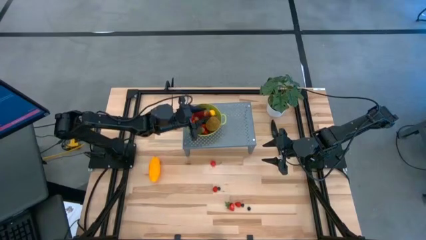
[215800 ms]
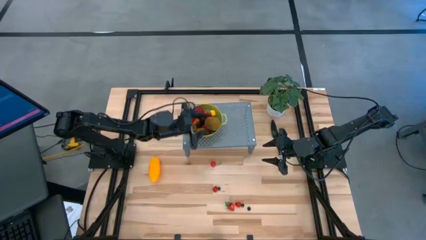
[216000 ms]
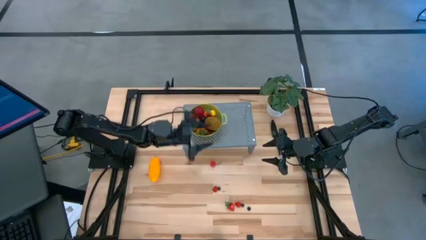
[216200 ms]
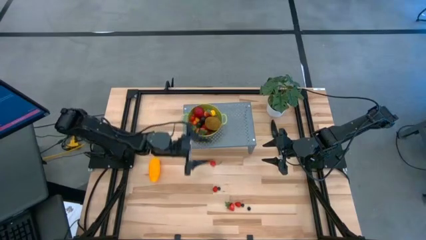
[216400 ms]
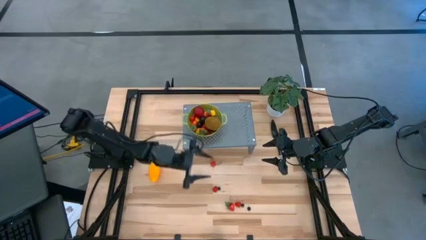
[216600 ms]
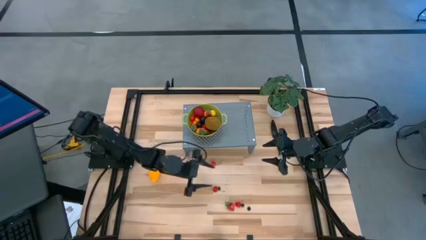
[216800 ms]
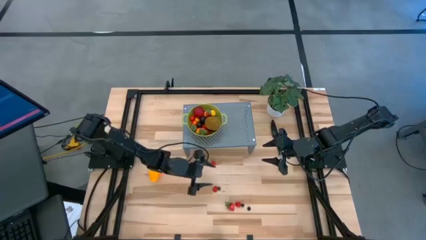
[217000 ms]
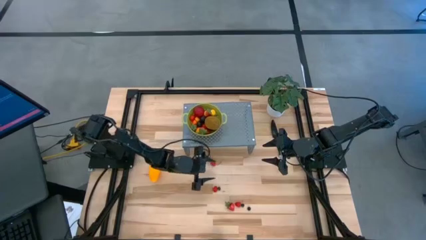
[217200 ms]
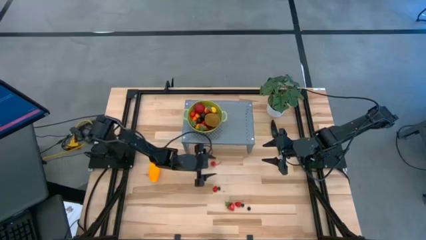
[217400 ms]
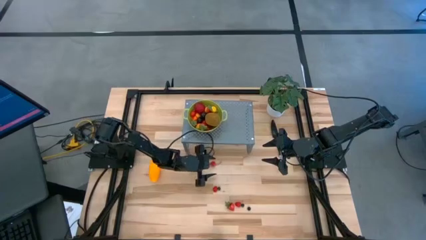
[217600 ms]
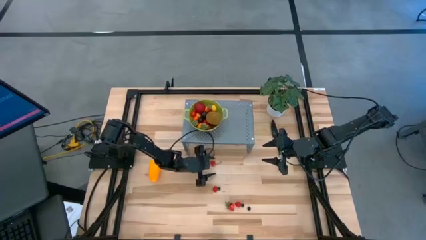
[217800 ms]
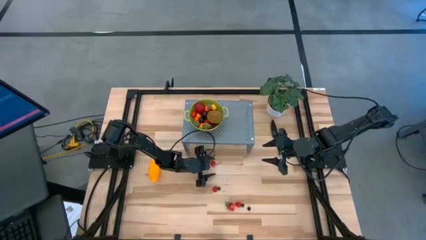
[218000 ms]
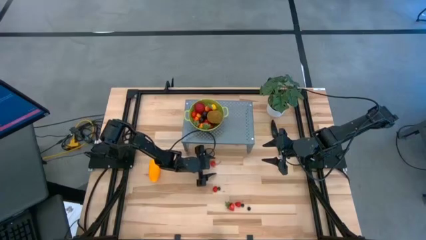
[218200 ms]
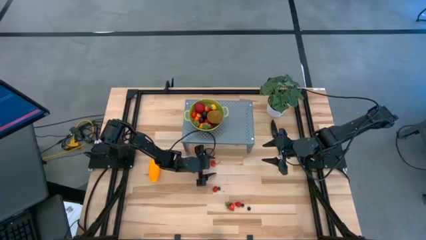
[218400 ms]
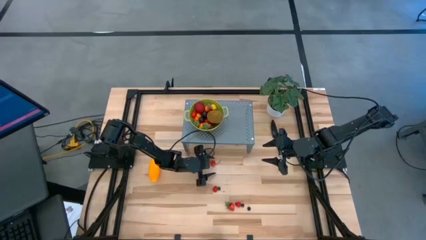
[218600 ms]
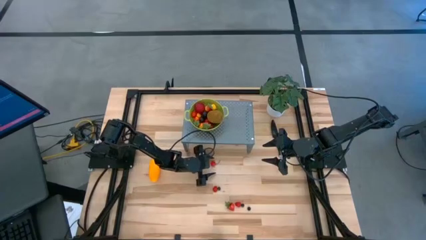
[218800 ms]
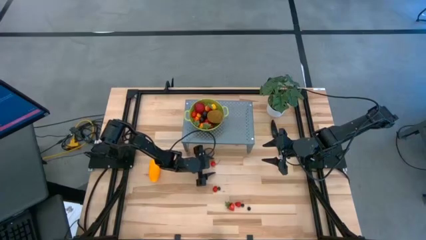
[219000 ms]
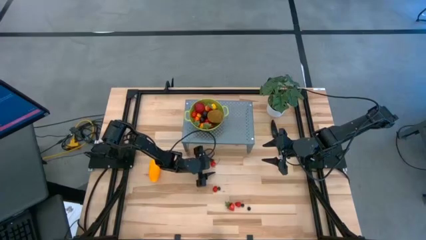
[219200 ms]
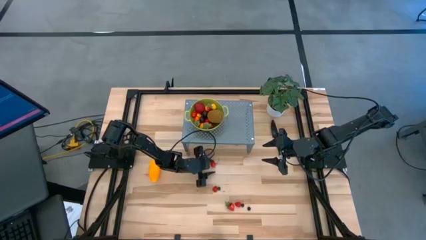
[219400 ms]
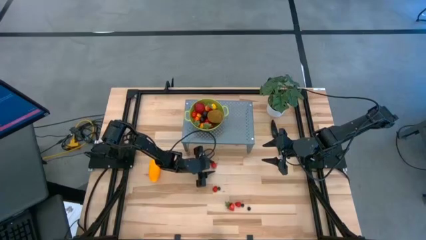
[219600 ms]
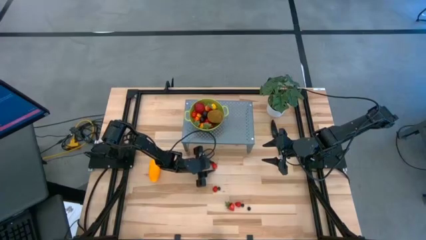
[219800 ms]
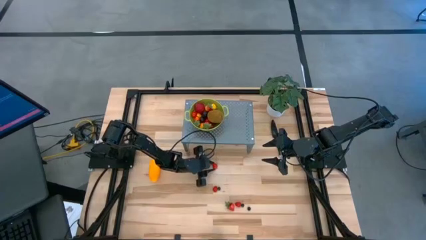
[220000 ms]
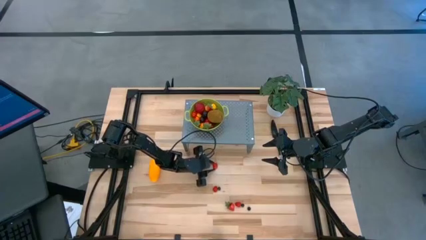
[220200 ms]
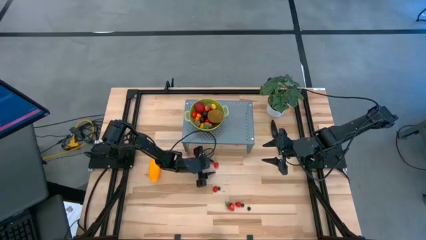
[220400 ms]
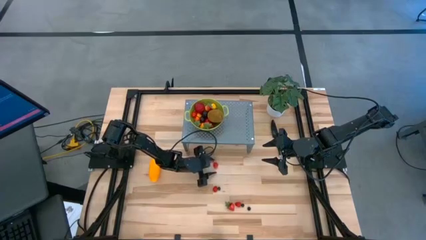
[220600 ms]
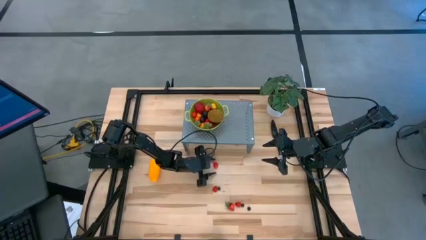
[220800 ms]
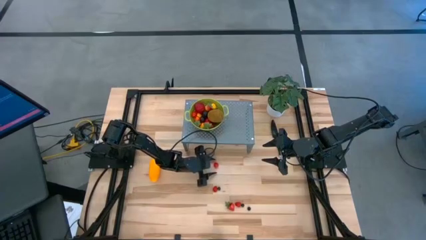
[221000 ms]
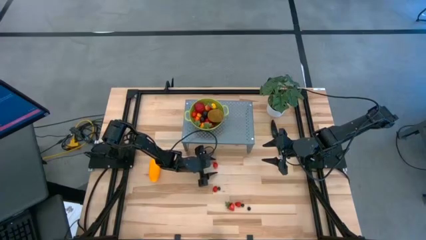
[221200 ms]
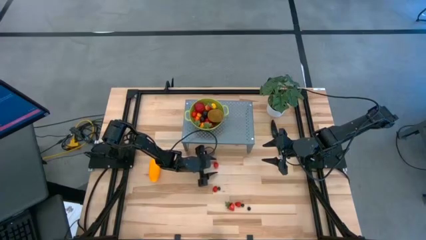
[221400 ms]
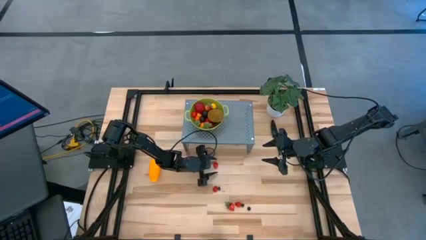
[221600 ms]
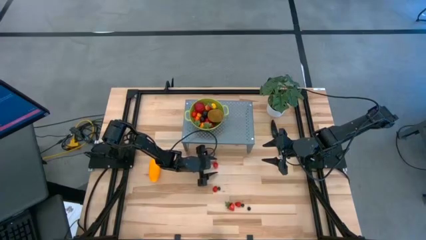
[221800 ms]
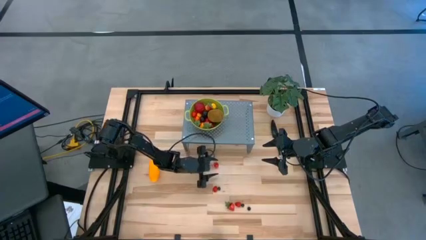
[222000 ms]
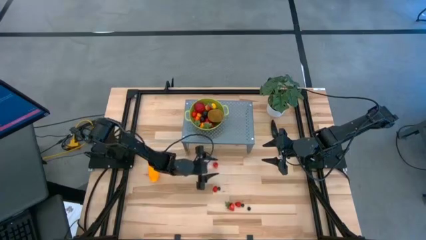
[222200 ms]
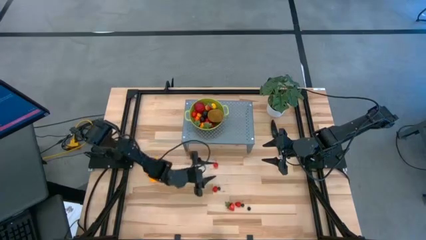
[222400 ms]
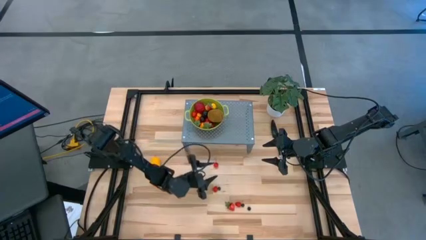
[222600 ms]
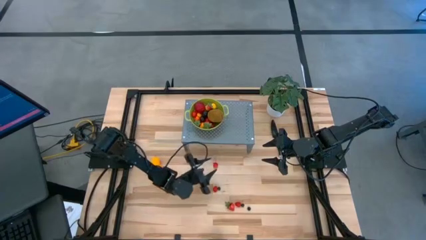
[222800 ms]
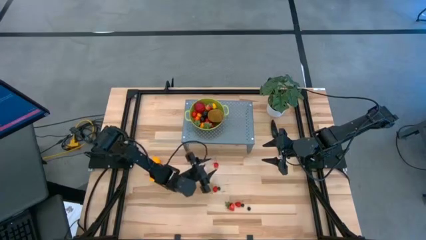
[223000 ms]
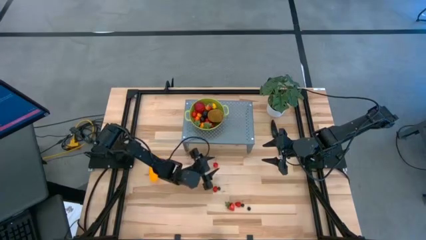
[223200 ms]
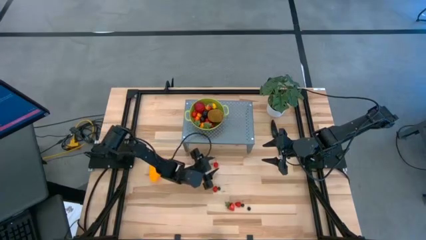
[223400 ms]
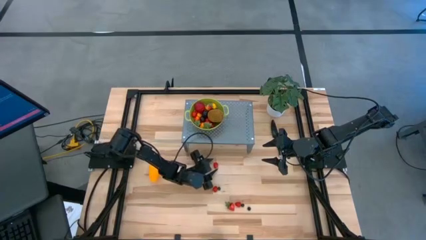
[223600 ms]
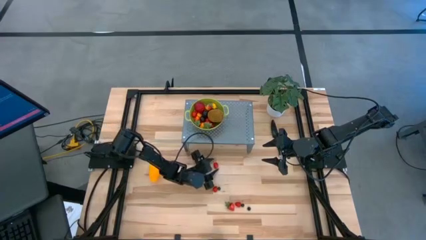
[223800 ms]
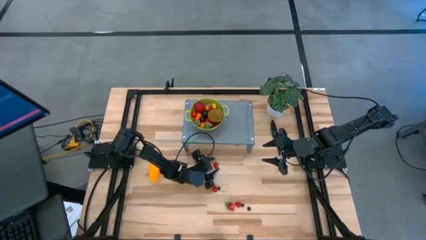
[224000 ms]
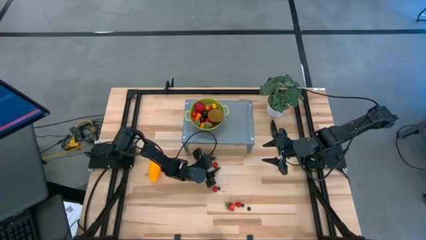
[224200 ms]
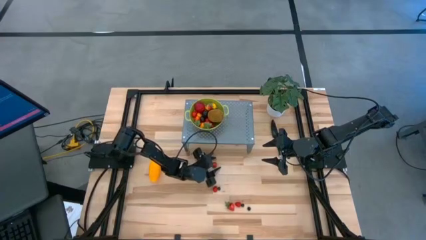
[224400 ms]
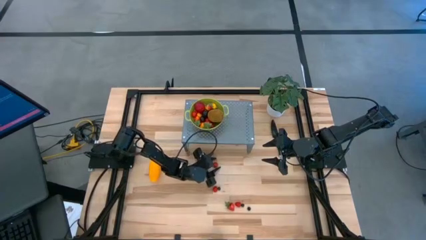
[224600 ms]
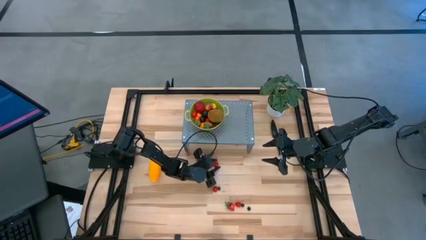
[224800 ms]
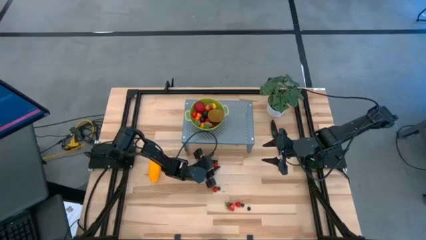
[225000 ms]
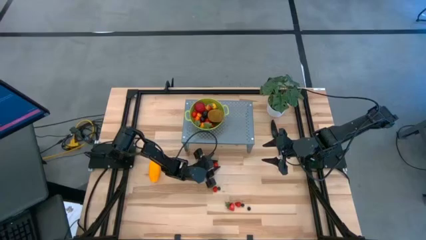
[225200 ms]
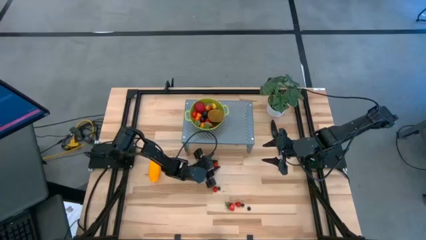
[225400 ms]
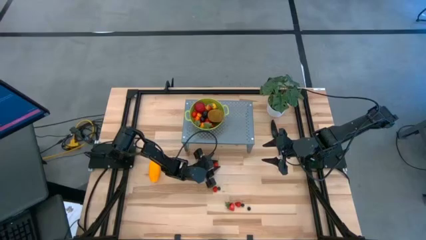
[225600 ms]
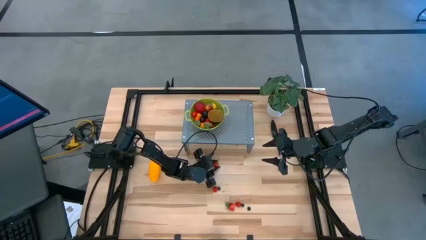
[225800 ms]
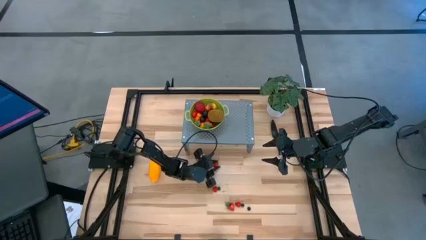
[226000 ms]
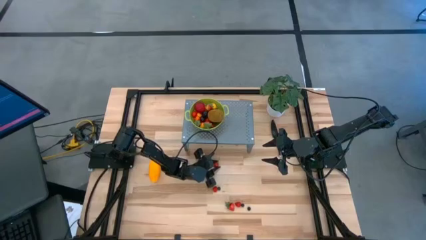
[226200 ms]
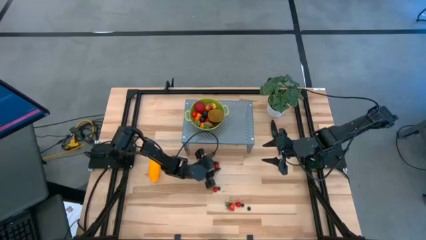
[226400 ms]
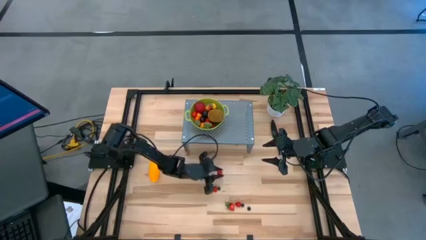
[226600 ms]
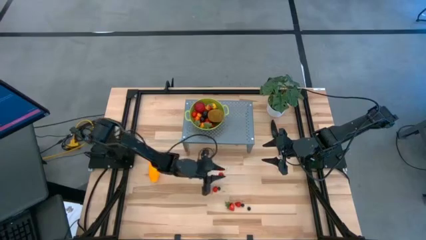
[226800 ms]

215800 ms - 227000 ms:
Task: Pick & Place Fruit
Put the red cherry into the green strainer bowl on the shelf

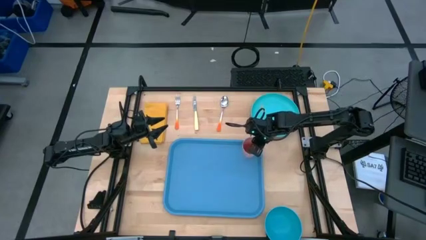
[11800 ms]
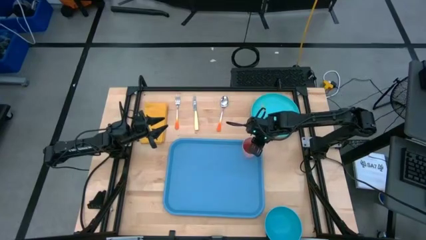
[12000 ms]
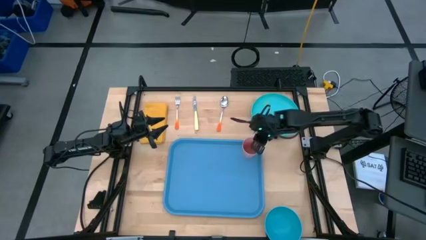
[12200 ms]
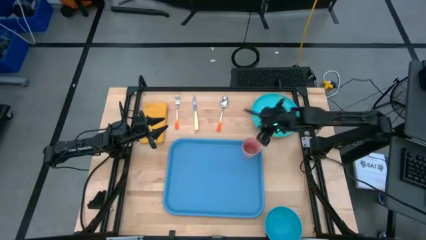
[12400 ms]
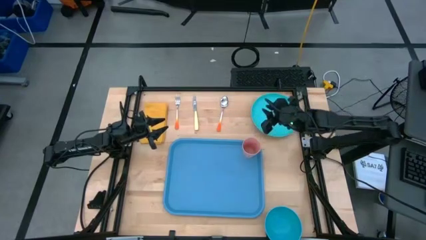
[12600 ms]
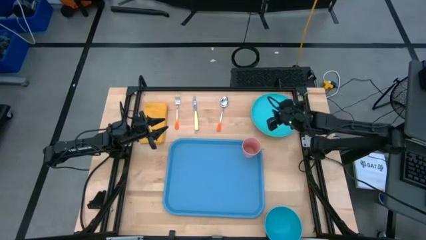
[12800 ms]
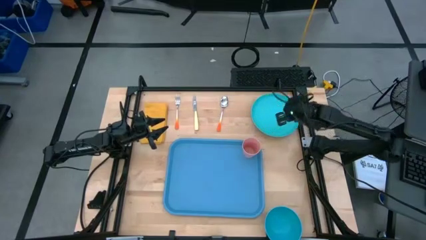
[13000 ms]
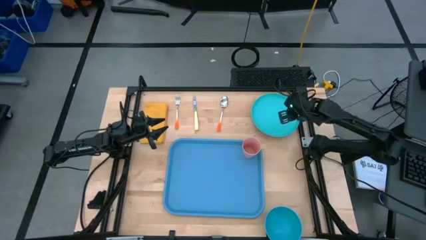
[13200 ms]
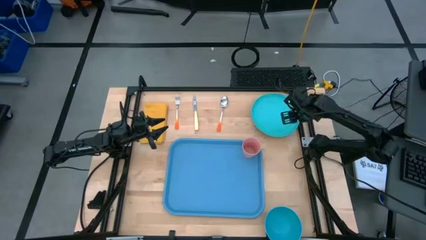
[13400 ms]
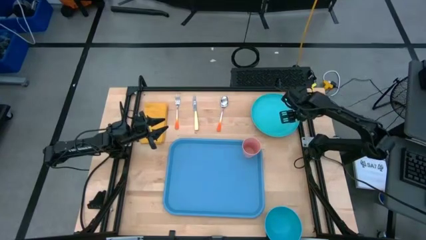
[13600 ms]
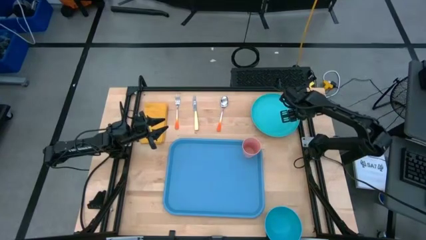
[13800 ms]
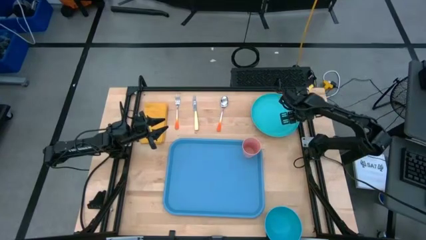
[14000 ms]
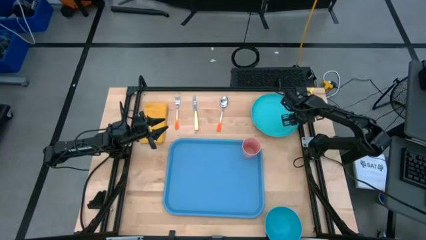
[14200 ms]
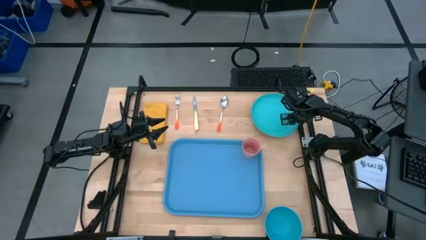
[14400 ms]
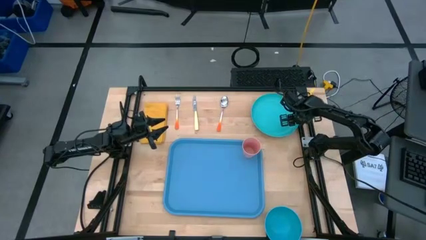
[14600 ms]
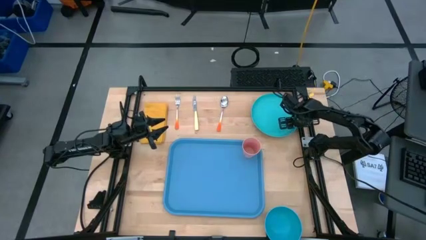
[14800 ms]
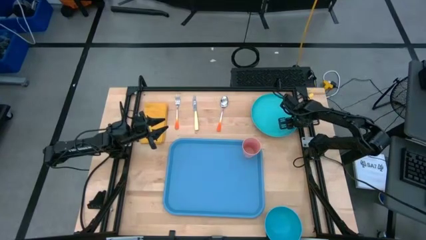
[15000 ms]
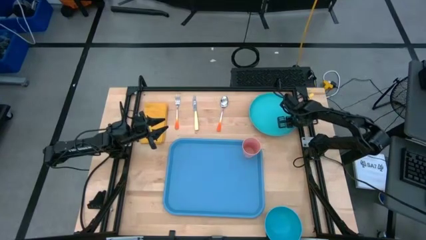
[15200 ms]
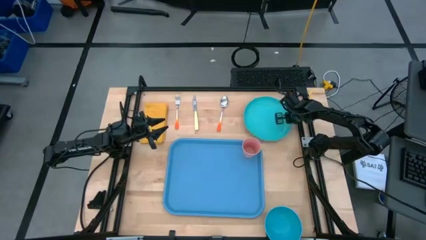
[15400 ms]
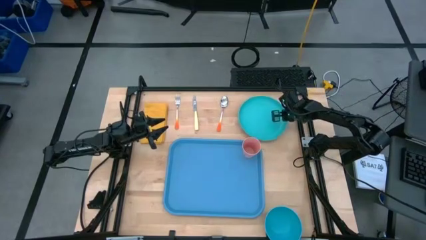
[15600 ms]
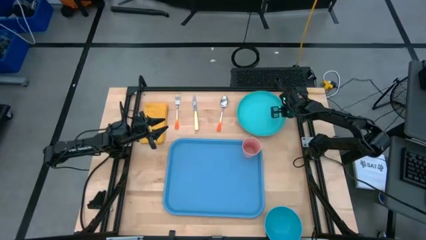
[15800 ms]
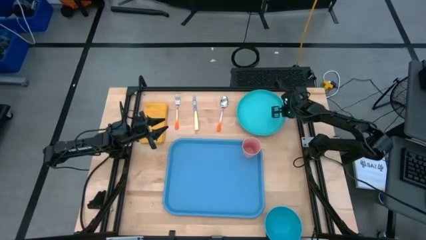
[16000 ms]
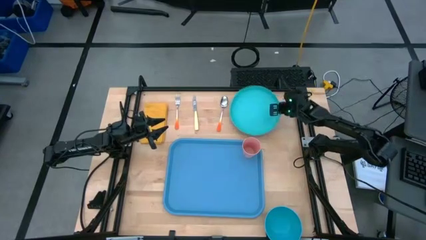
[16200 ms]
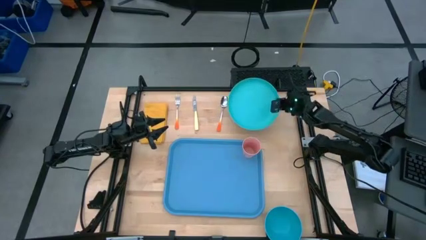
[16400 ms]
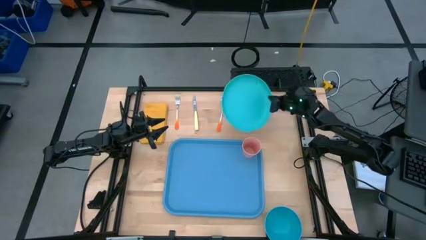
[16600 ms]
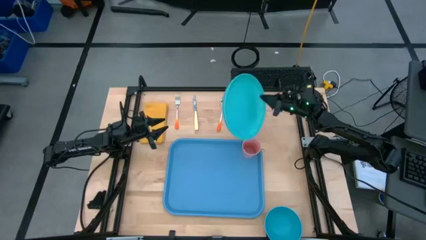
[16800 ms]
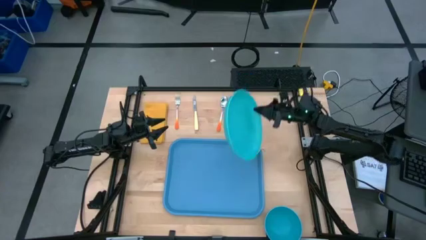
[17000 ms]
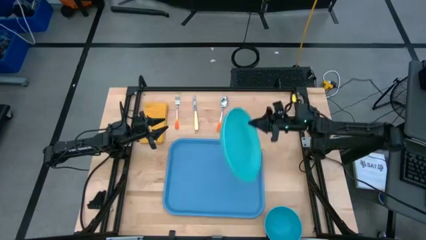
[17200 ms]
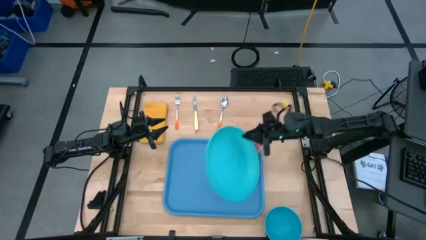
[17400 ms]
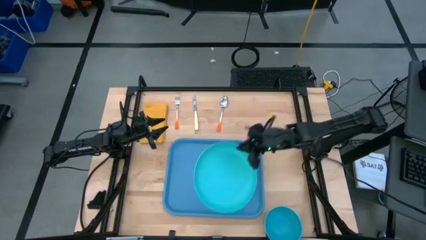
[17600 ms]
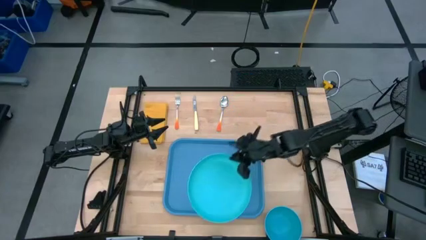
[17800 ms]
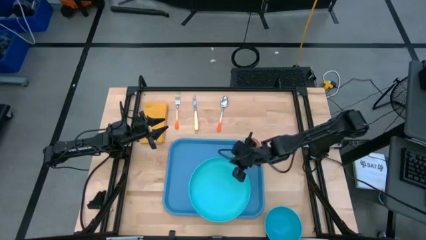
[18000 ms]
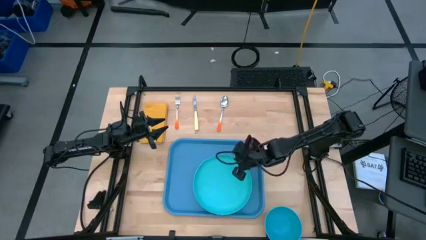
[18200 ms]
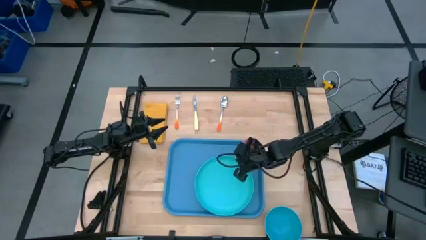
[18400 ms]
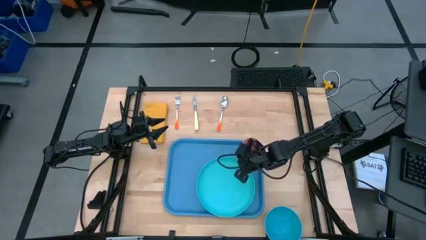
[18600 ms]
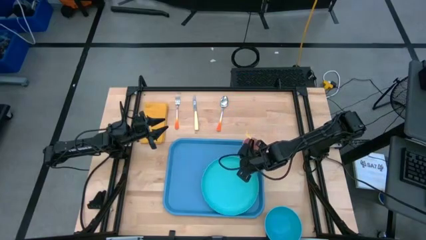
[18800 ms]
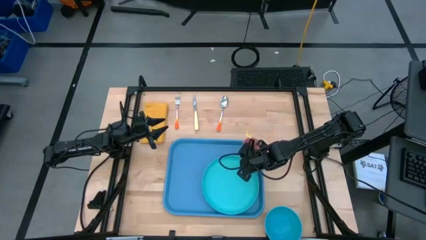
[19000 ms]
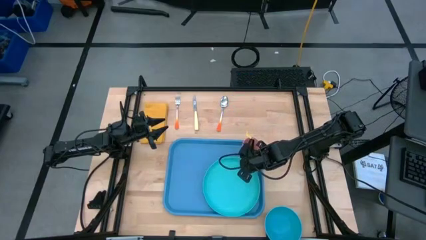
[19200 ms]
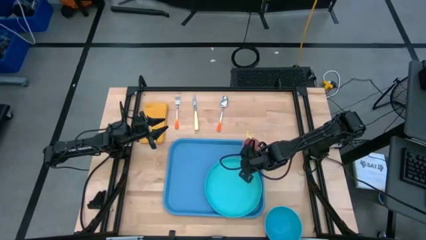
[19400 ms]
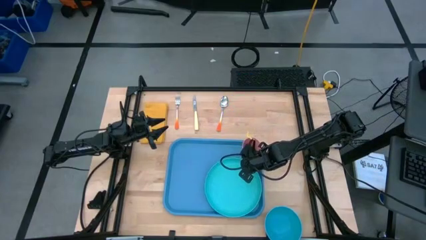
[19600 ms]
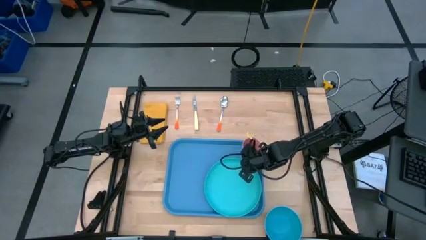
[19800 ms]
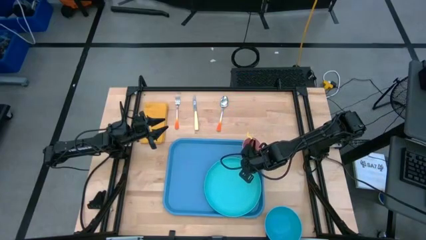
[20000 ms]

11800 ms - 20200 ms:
Task: Set up tray
Put the blue plate on the blue serving tray to the bottom of the pink cup
